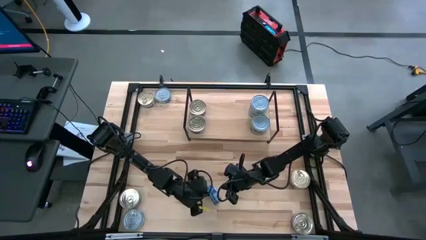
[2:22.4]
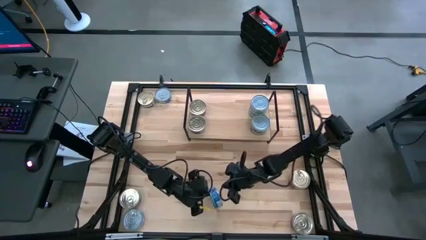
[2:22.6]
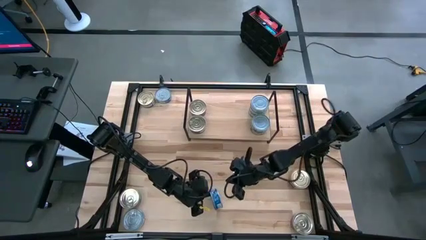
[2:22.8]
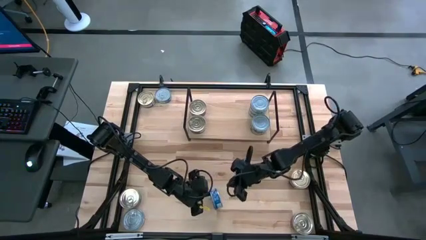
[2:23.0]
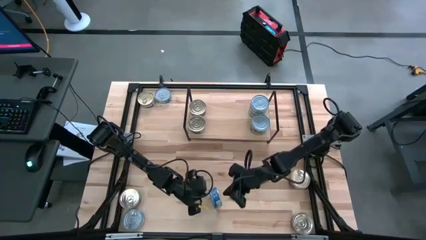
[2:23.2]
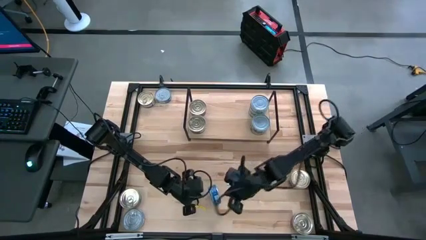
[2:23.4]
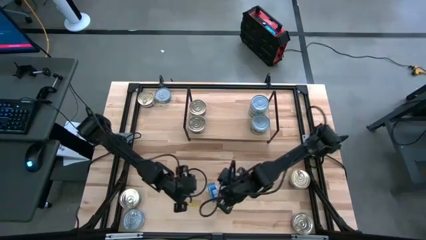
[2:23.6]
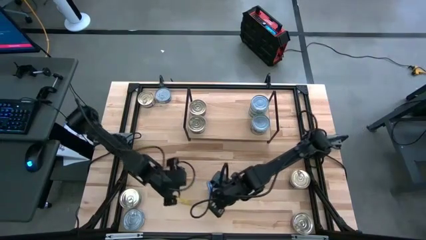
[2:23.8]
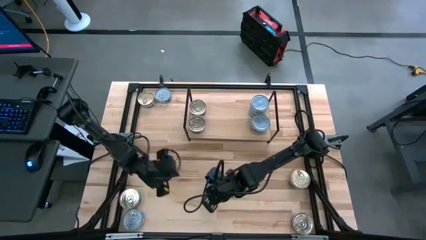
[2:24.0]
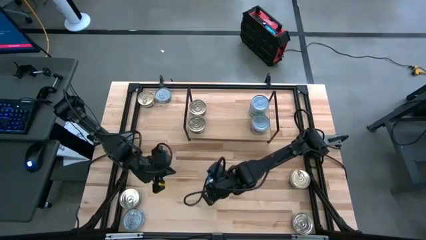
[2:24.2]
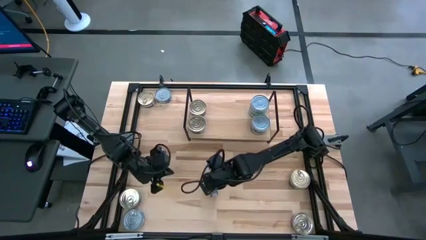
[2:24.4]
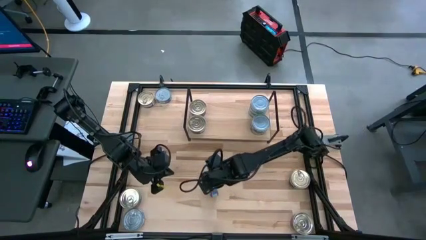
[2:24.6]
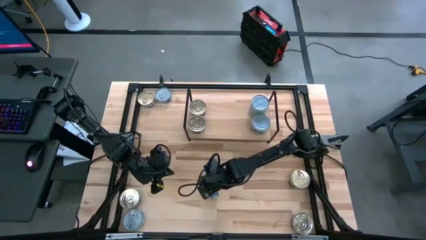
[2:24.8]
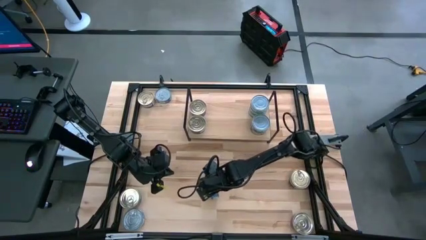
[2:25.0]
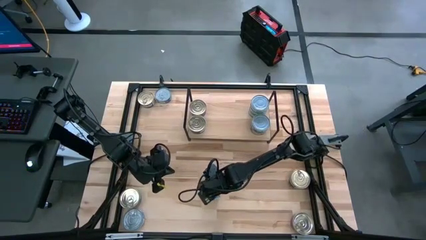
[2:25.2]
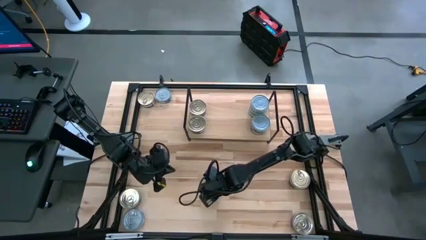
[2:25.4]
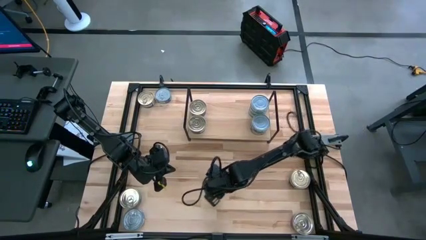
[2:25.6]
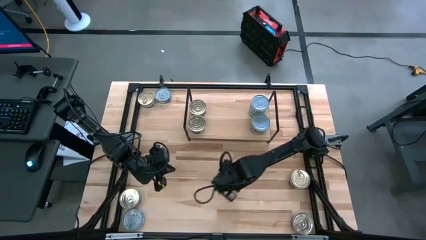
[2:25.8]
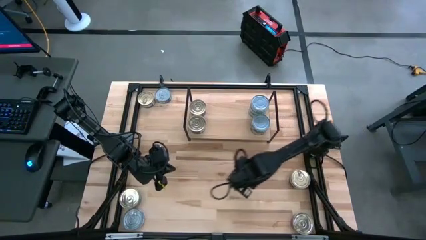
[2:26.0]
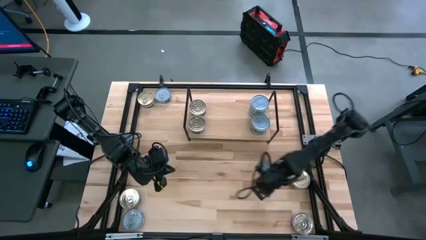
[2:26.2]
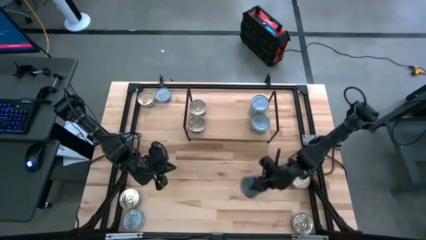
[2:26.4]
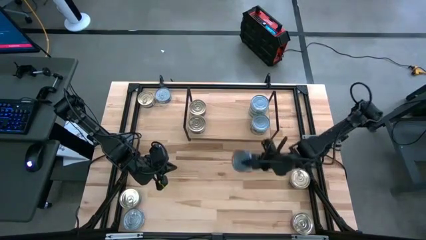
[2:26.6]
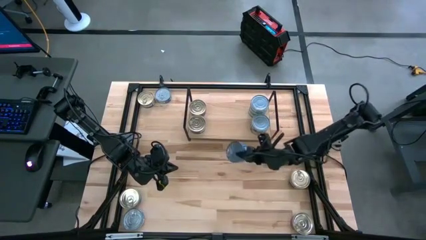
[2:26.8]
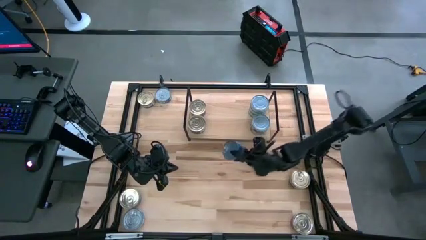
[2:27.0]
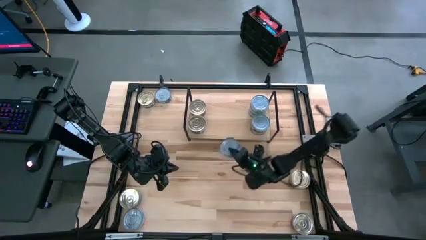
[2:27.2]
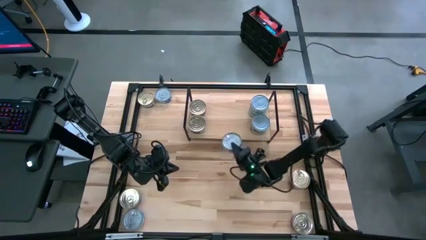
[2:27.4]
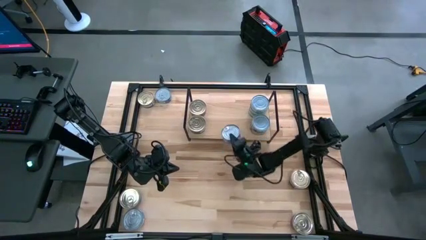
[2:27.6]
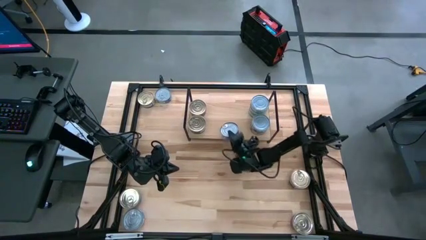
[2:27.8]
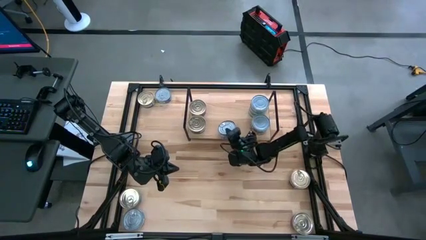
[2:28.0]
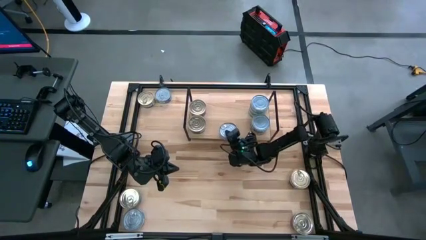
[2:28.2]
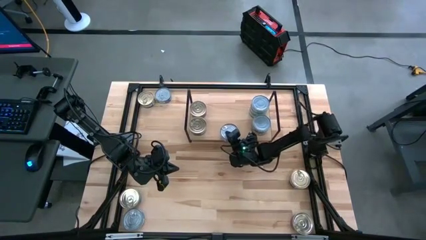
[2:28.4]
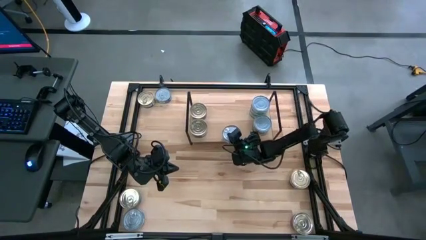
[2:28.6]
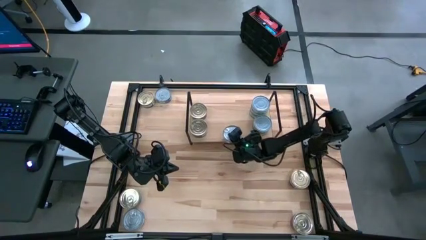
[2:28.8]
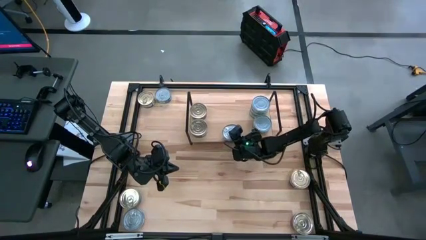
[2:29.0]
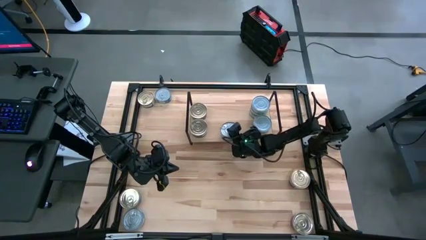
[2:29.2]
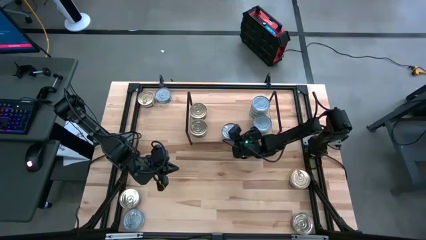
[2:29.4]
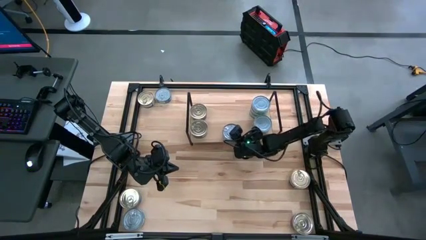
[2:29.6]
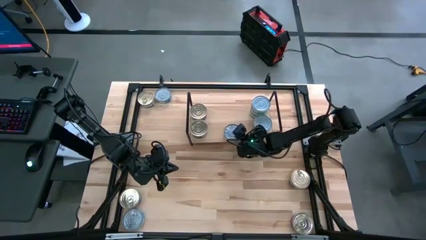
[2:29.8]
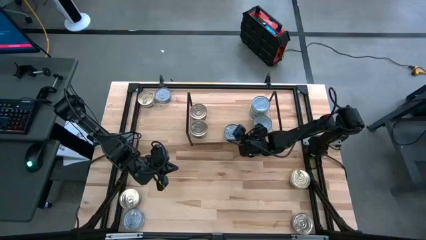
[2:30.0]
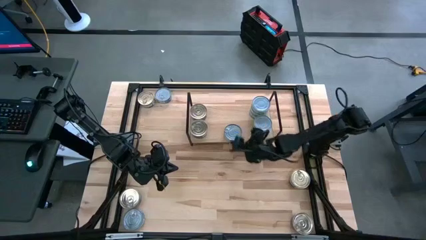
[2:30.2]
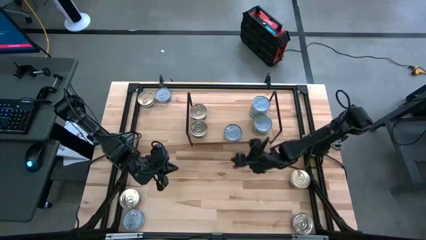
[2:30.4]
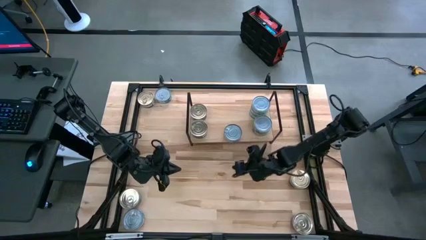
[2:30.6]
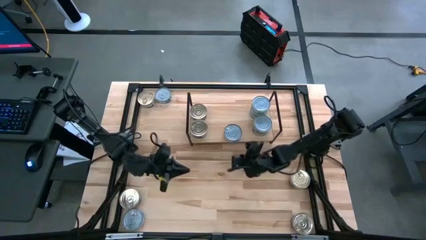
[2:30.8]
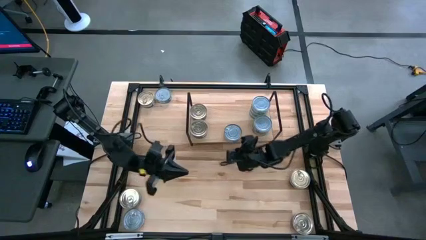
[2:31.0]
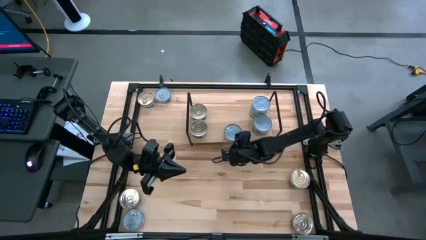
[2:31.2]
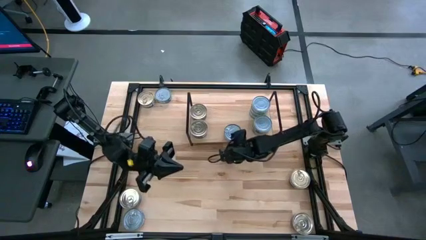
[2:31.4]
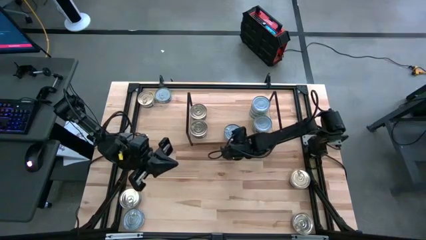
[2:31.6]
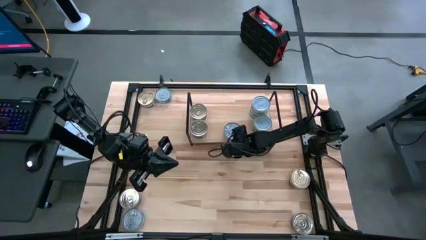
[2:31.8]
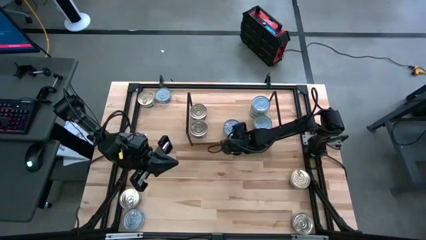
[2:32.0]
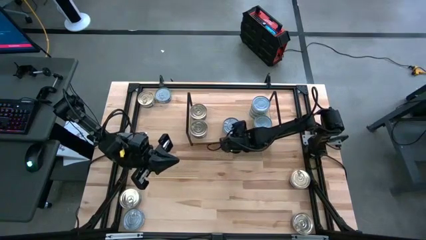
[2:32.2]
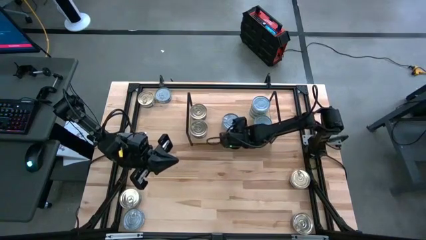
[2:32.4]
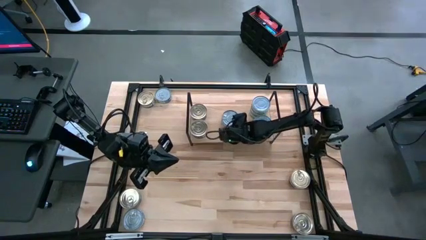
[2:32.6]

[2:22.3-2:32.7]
Task: Stack canned seafood by type on shelf
Put the blue tuna can on the shelf

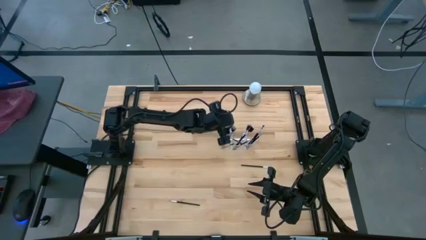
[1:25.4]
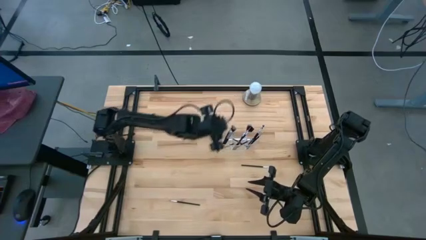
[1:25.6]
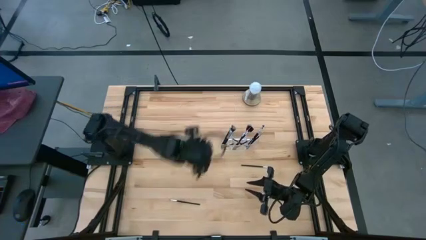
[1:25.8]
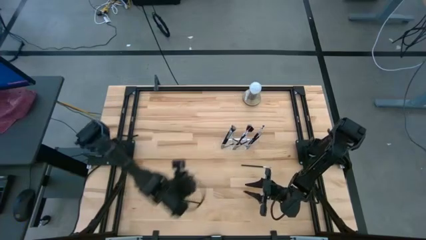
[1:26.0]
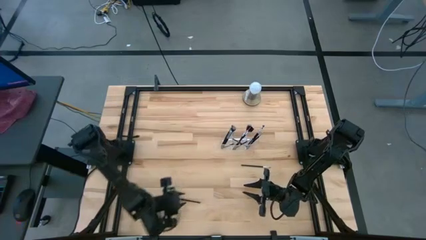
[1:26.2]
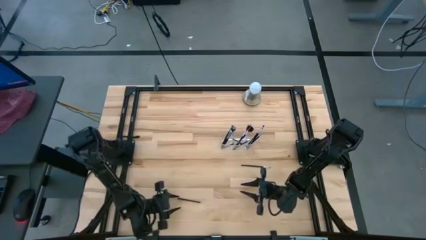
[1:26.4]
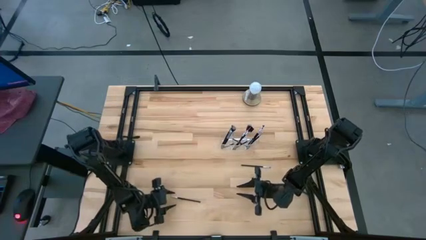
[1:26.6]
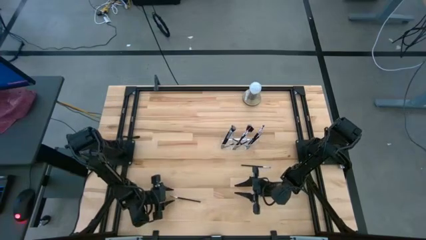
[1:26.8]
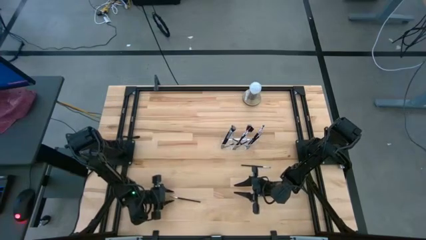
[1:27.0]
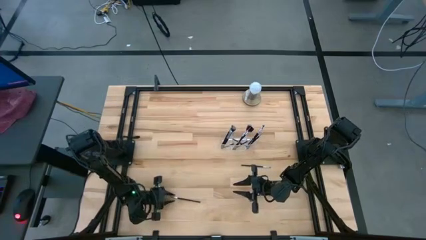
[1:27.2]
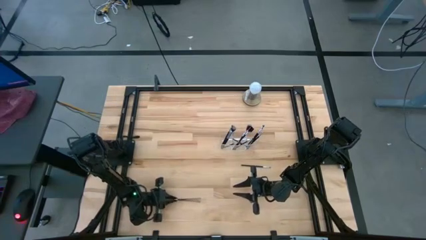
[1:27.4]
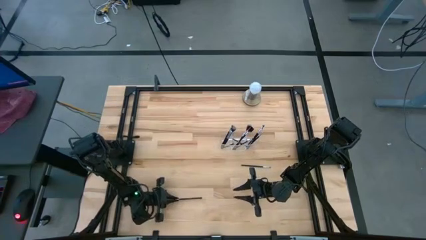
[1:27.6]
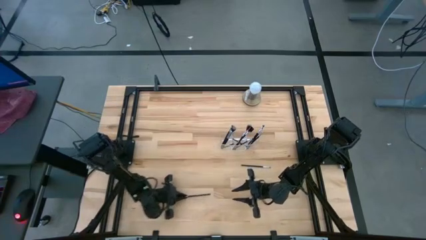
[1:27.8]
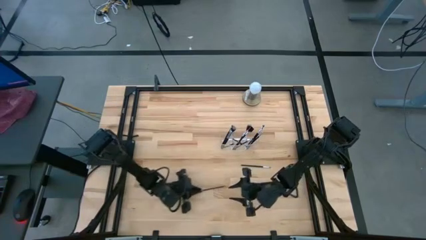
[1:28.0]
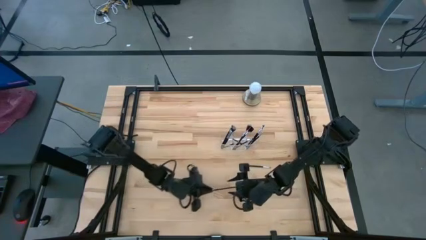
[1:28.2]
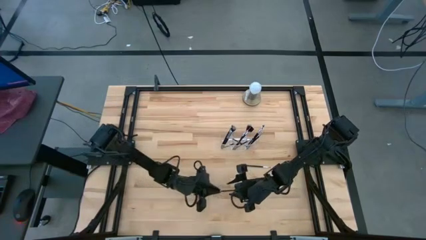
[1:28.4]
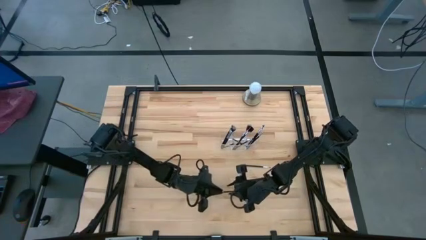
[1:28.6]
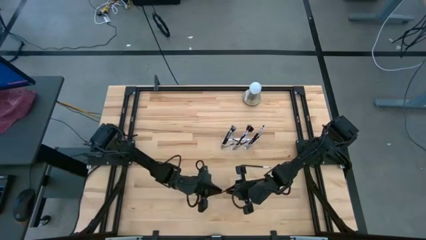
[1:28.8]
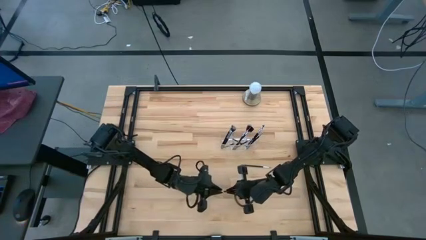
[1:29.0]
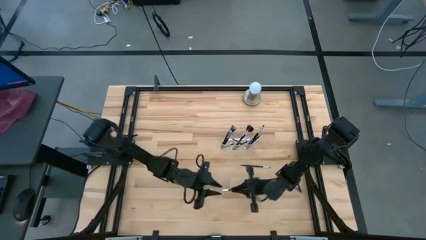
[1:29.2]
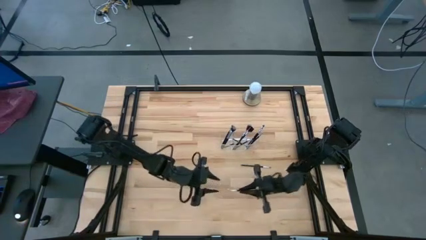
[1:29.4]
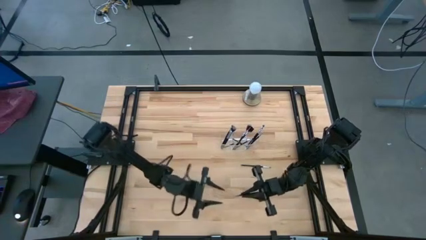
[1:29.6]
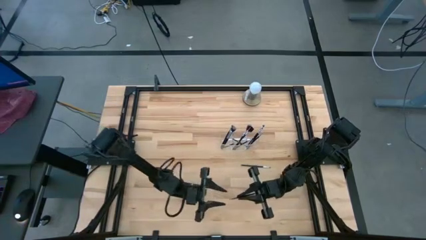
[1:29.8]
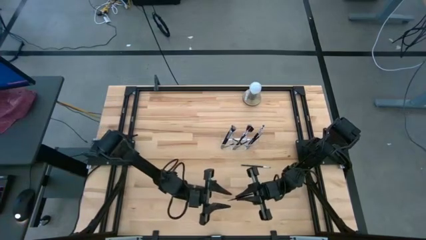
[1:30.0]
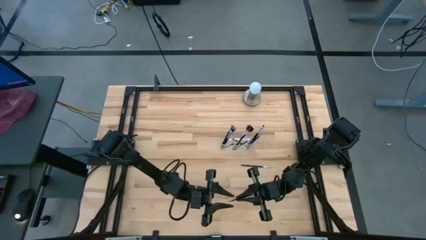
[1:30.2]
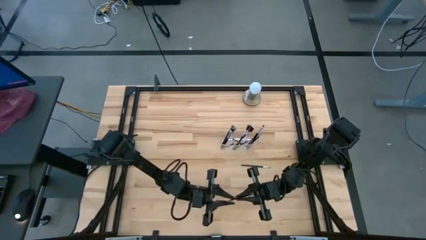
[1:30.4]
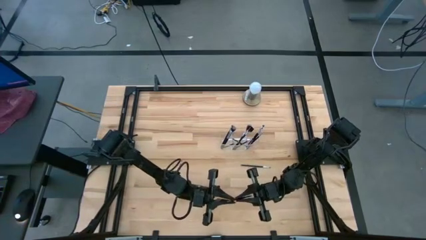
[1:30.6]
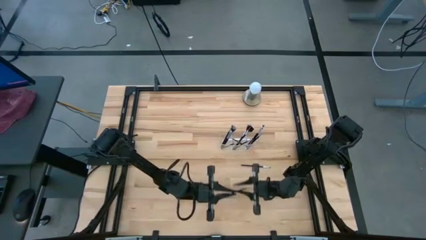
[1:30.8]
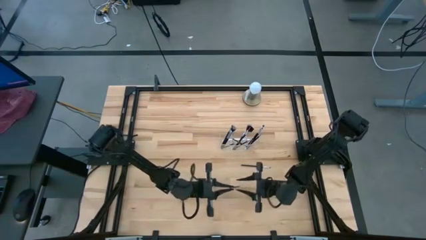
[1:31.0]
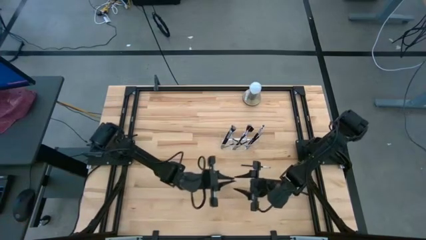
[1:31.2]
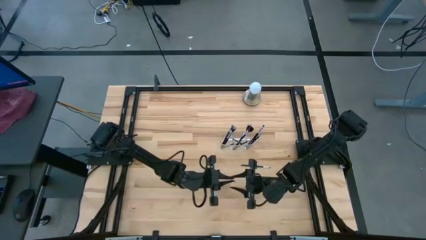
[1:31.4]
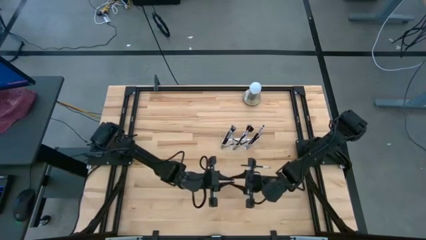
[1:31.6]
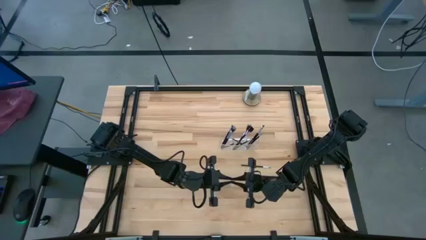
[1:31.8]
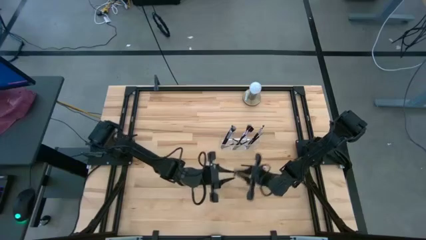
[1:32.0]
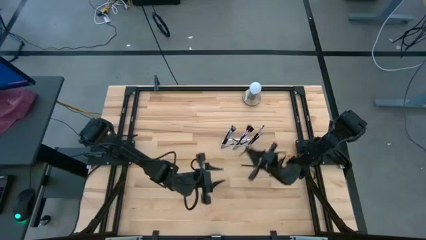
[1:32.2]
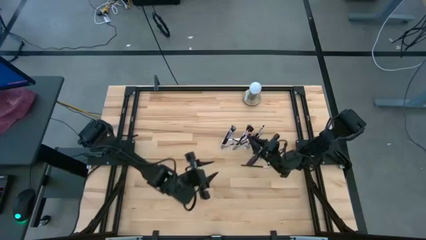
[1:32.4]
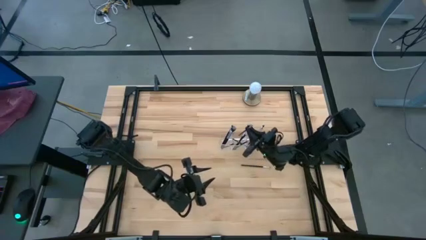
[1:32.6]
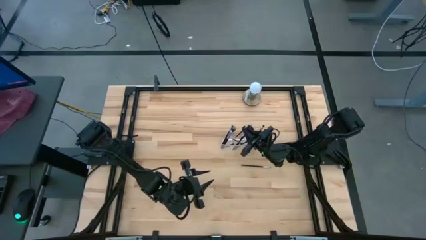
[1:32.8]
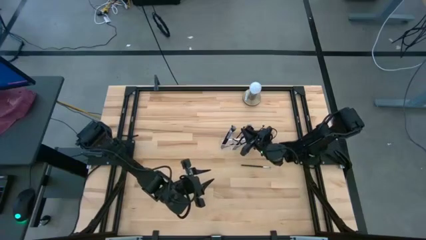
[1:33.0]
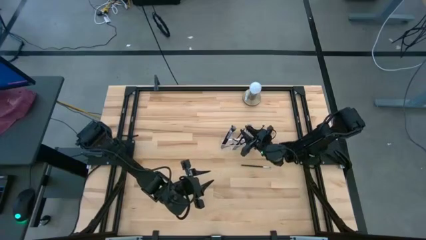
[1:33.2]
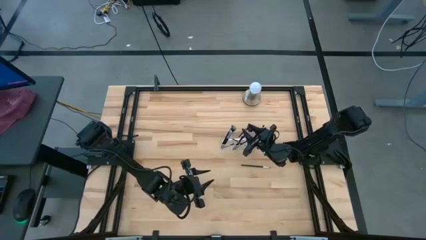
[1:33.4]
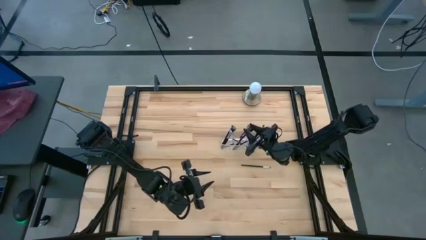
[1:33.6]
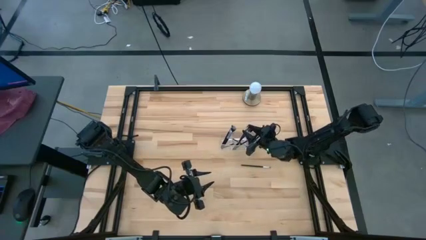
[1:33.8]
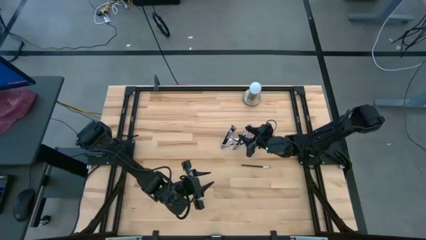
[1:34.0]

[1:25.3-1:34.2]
Task: Put items in baskets/containers
Put the black eyeshadow brush into the transparent organizer
